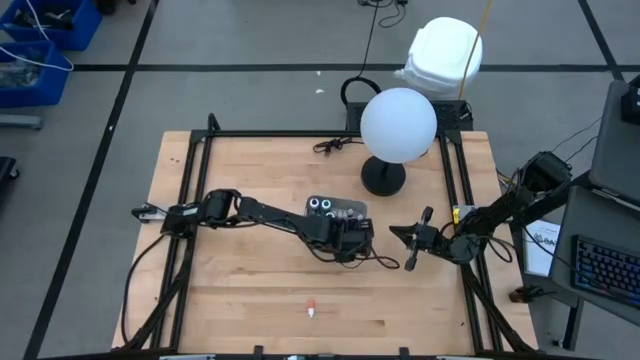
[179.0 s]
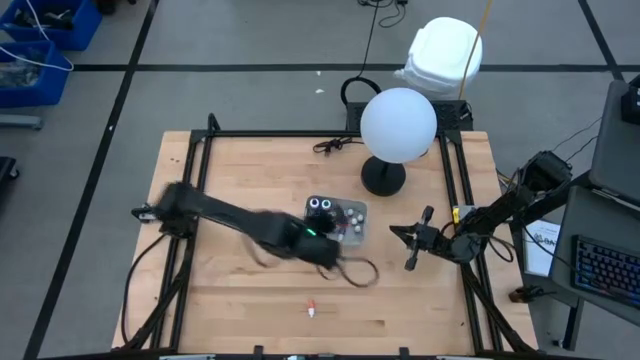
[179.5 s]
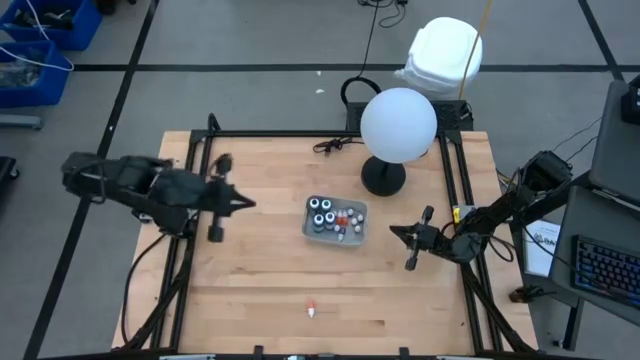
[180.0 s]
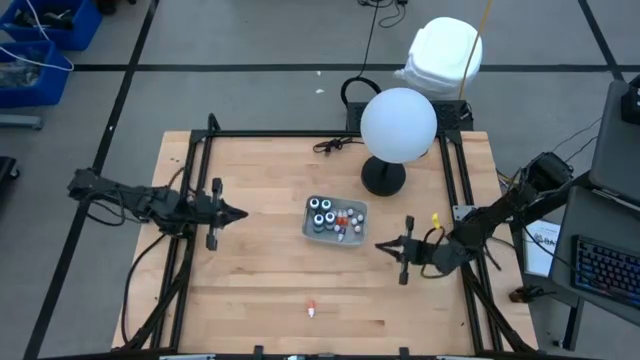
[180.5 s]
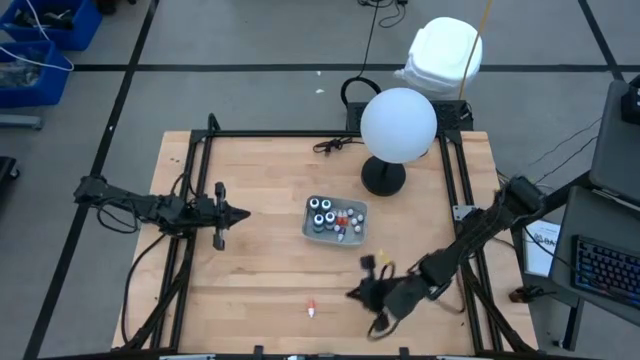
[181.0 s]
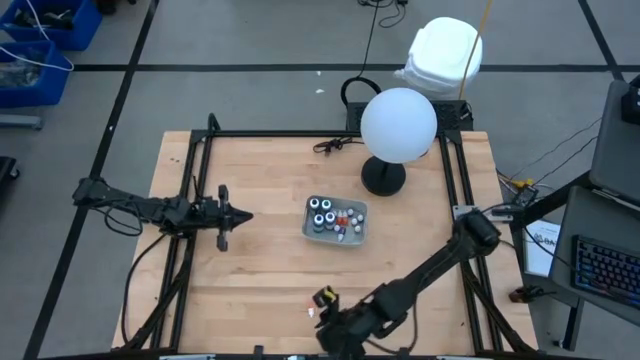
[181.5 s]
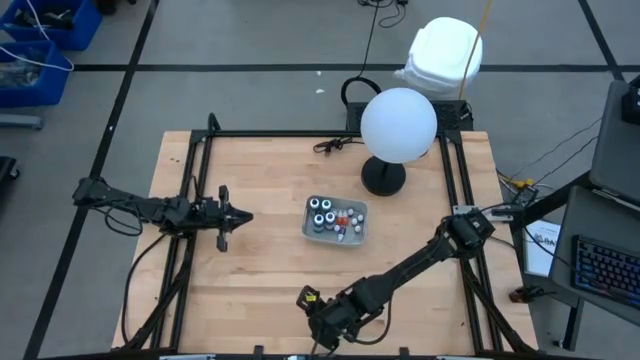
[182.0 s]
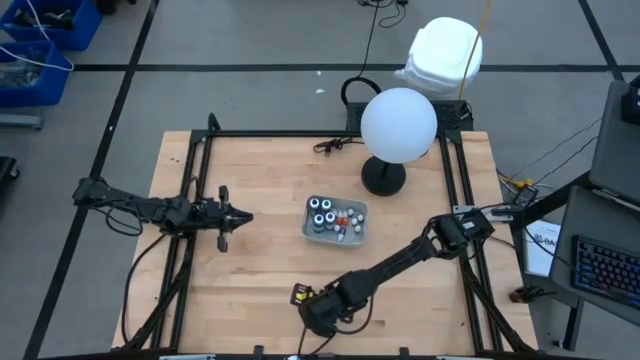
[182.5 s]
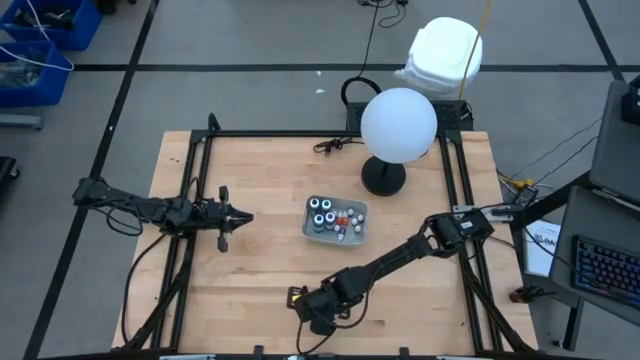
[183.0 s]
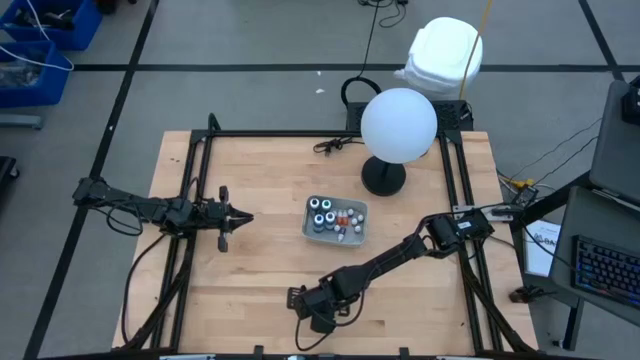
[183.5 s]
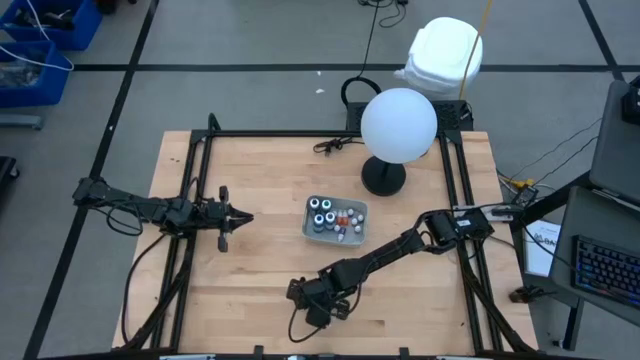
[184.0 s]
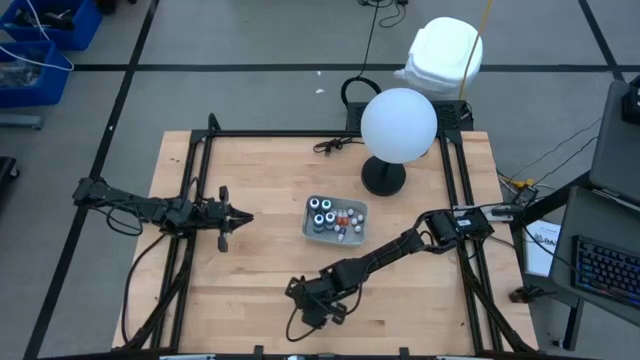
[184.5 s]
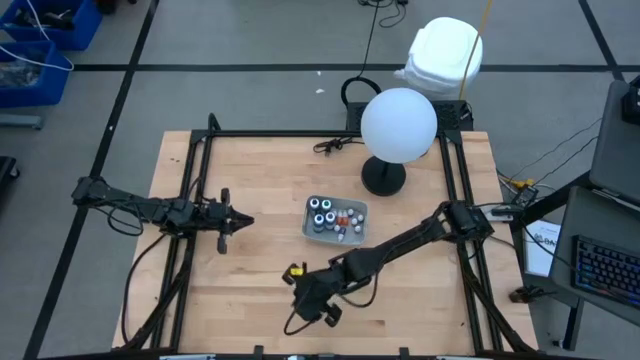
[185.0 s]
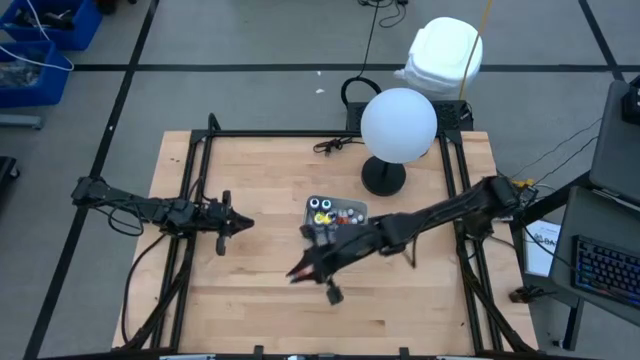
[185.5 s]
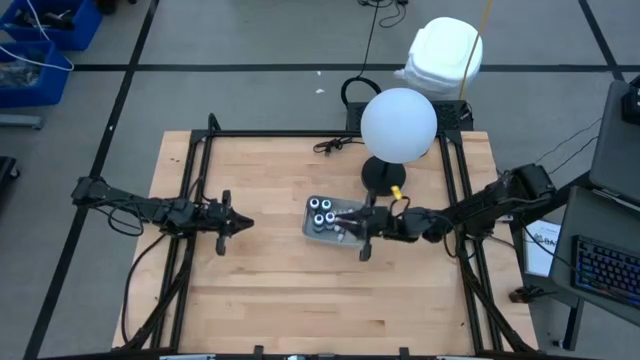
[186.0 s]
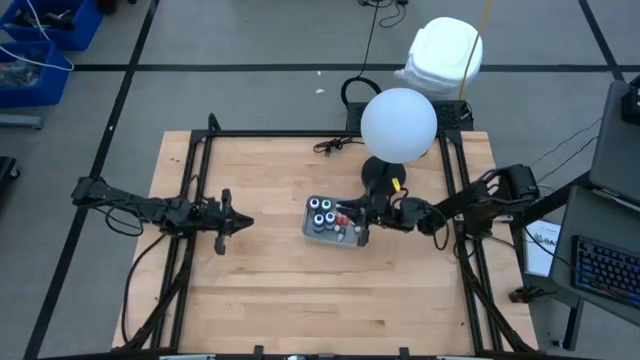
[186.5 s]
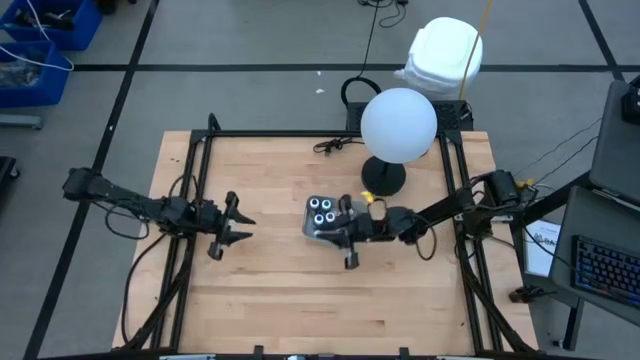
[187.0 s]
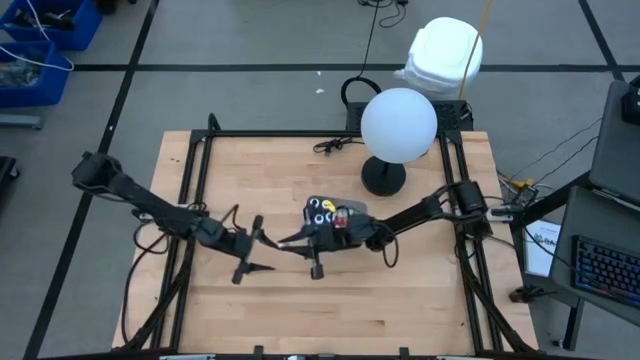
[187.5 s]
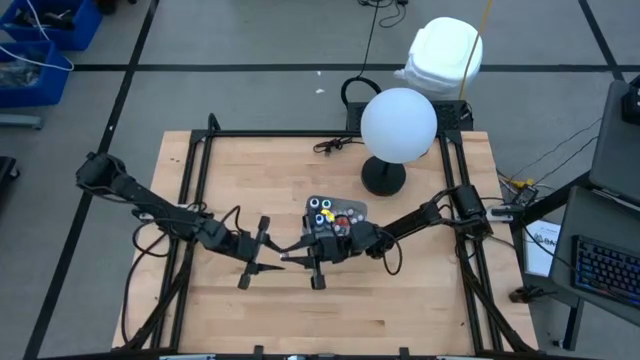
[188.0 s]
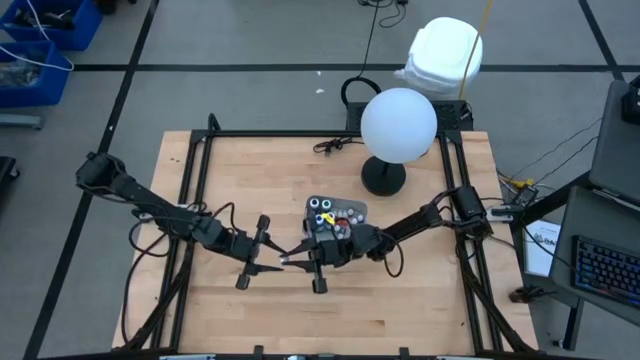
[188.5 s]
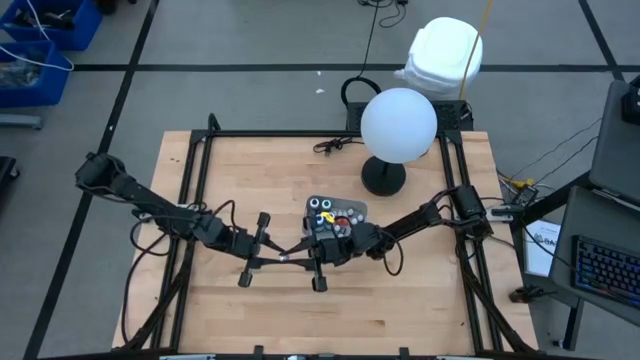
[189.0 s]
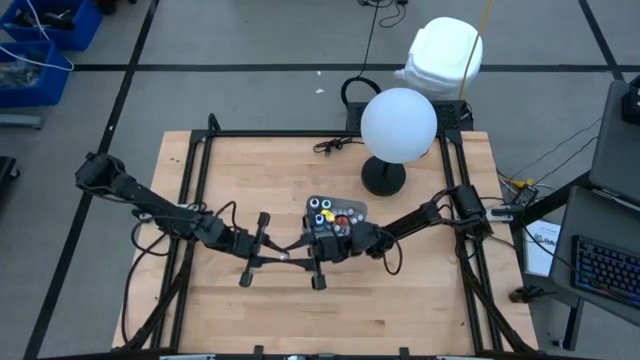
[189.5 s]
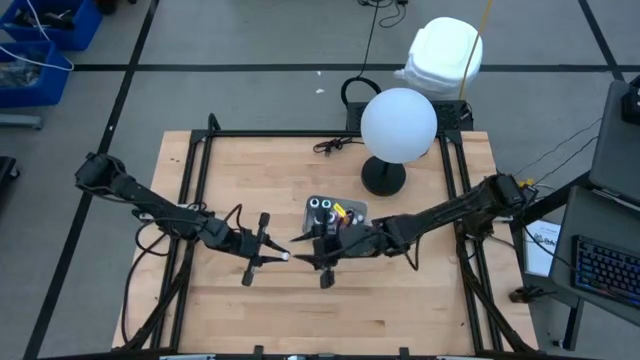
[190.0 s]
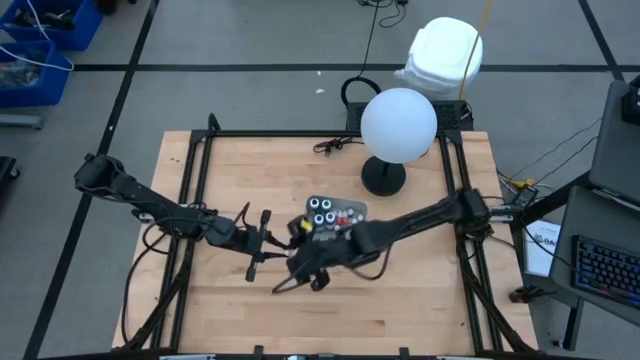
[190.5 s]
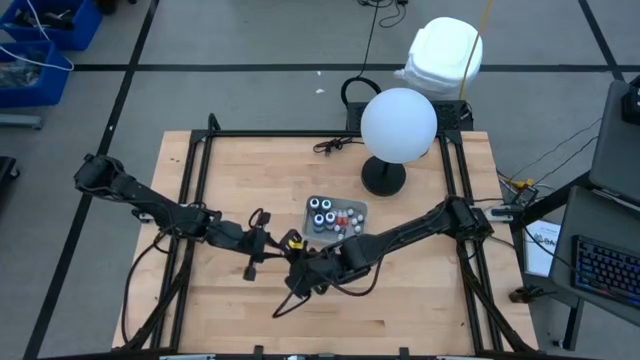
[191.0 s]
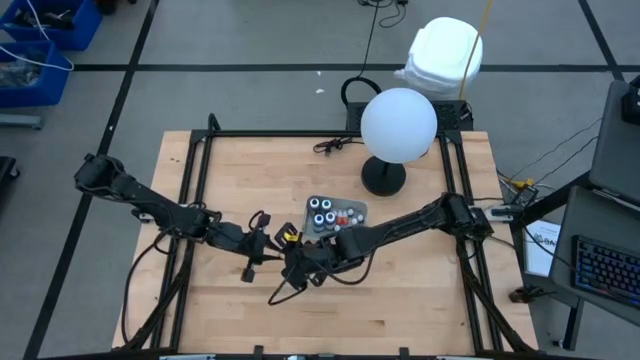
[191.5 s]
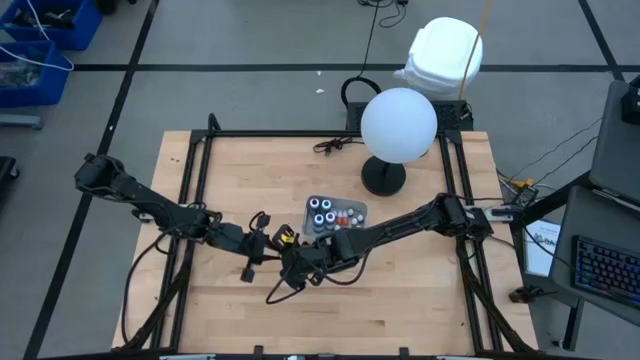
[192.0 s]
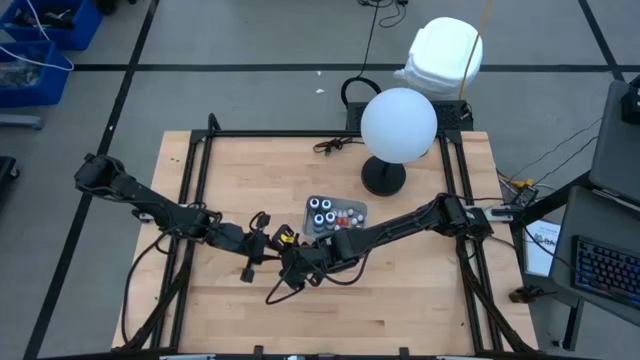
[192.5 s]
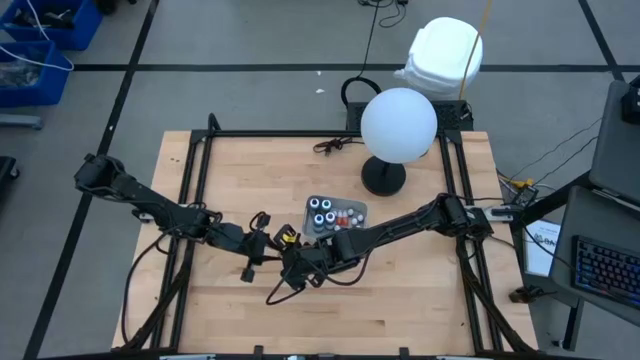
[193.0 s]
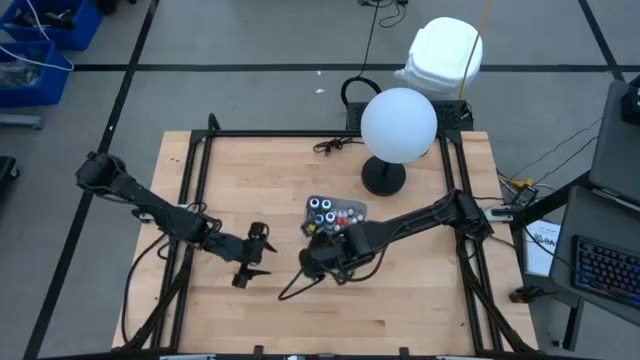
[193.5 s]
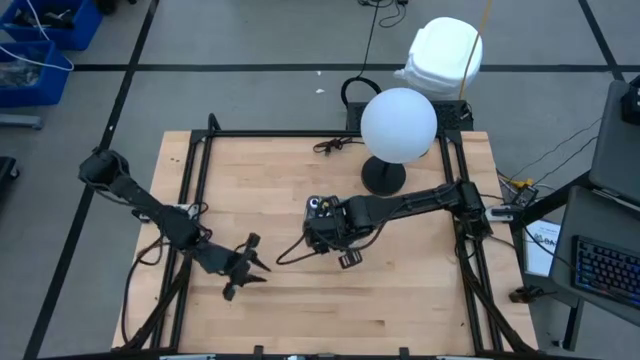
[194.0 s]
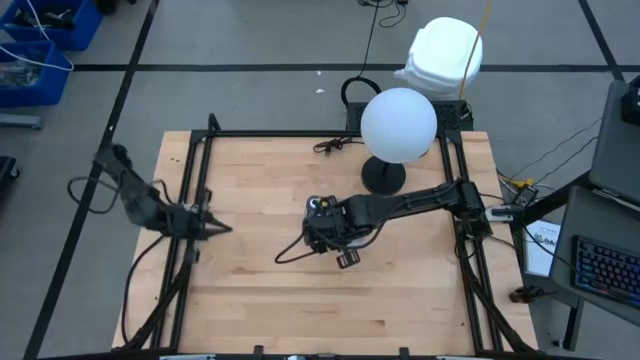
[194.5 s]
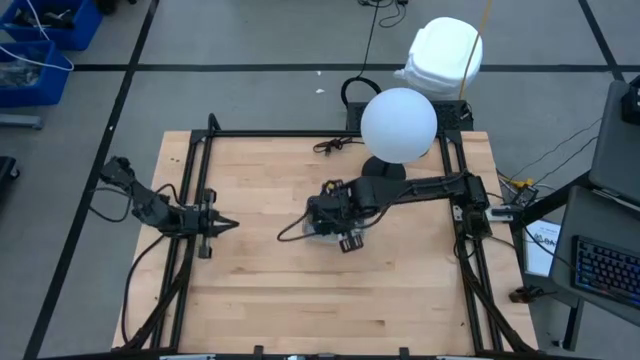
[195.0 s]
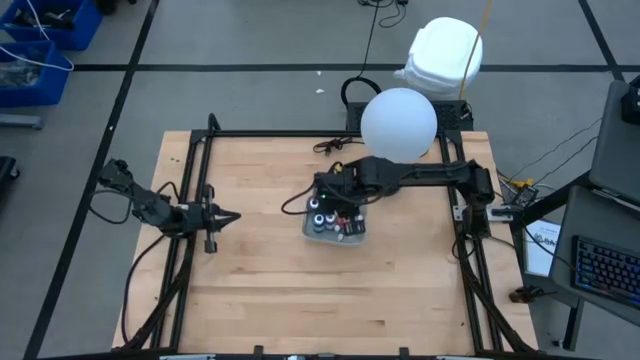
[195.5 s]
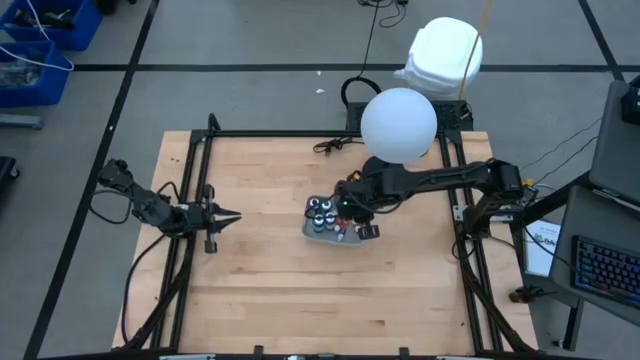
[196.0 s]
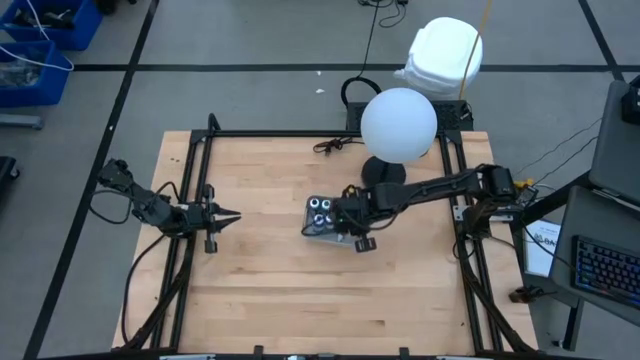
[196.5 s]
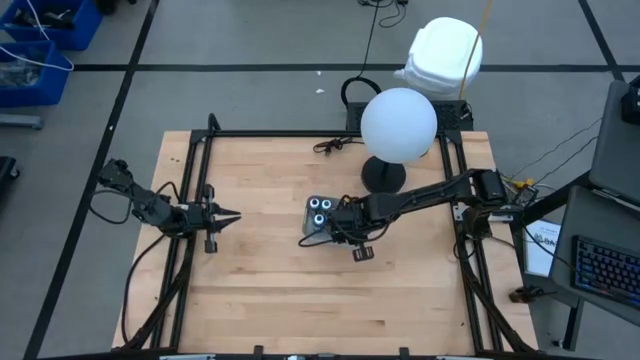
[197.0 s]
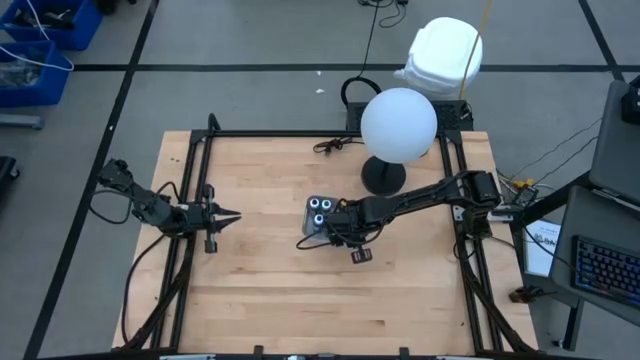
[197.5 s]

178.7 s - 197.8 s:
Task: Pick & Place food coloring
Put the small orange food coloring bottle into the gray bin

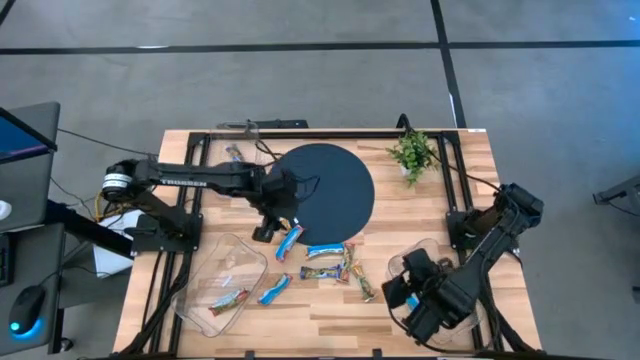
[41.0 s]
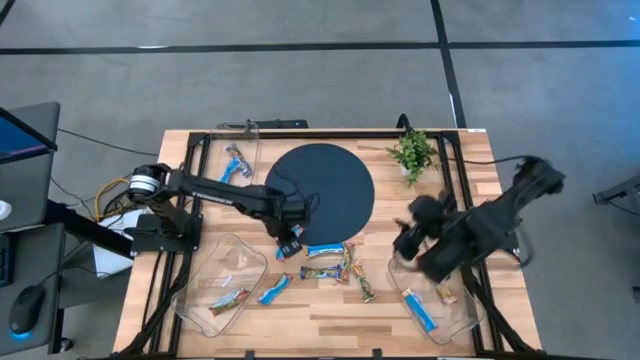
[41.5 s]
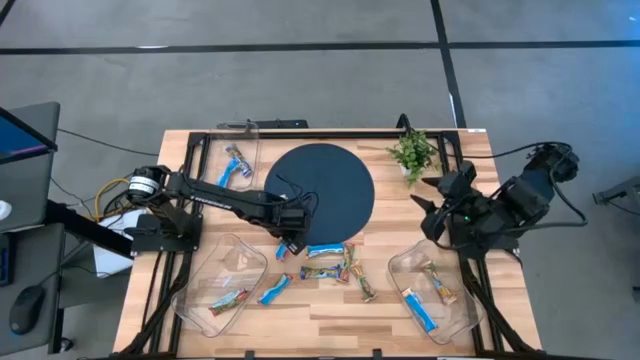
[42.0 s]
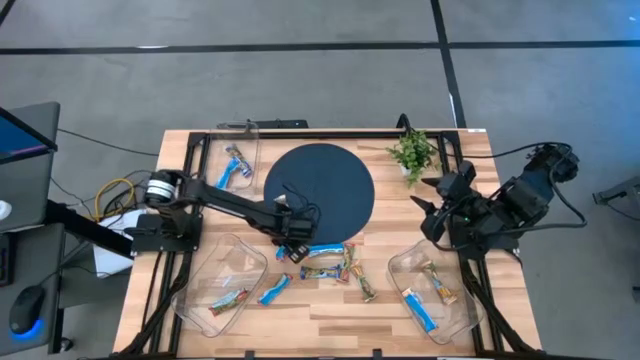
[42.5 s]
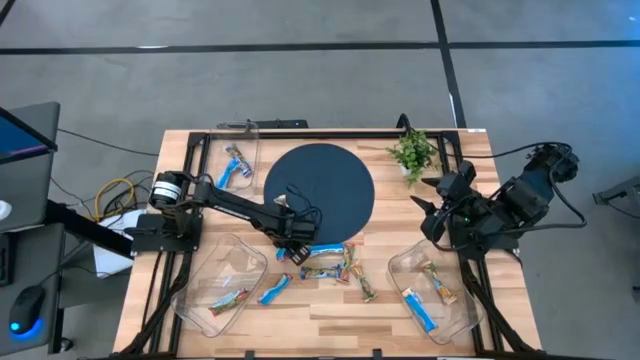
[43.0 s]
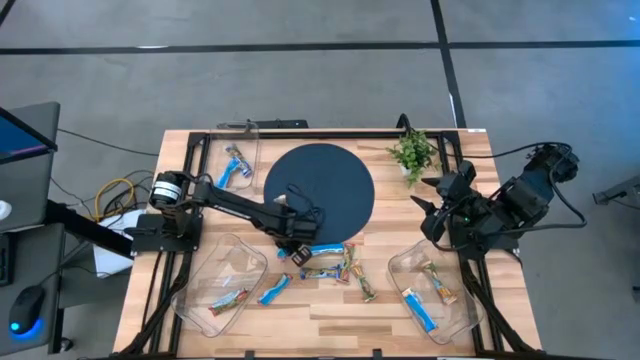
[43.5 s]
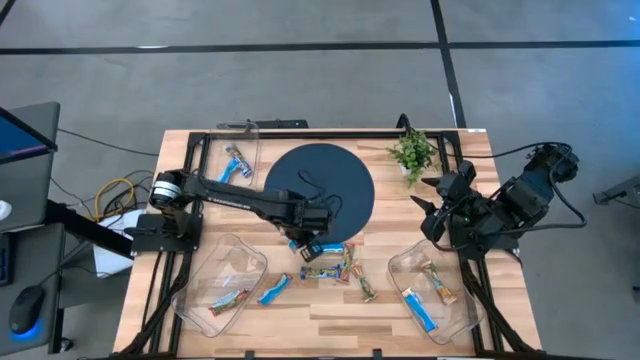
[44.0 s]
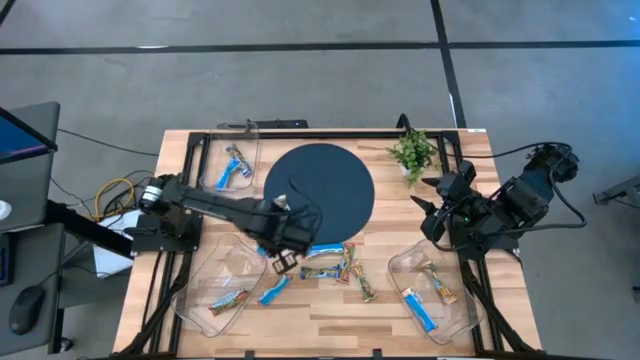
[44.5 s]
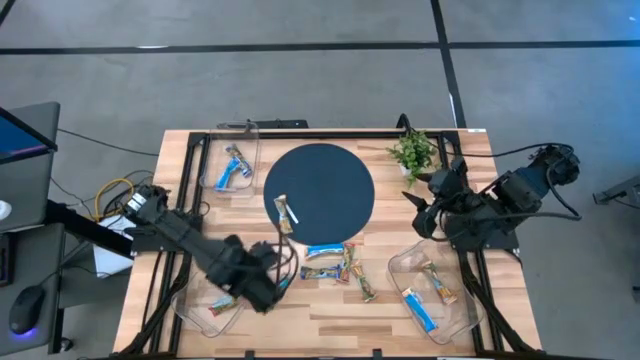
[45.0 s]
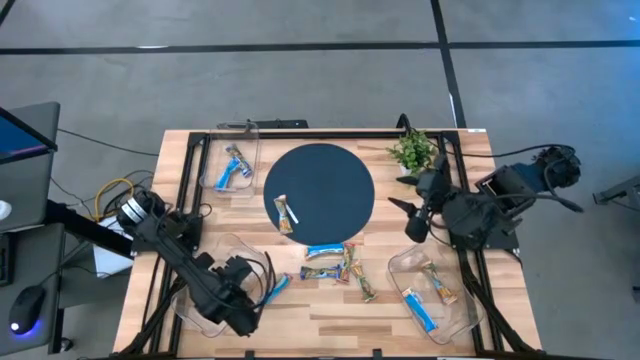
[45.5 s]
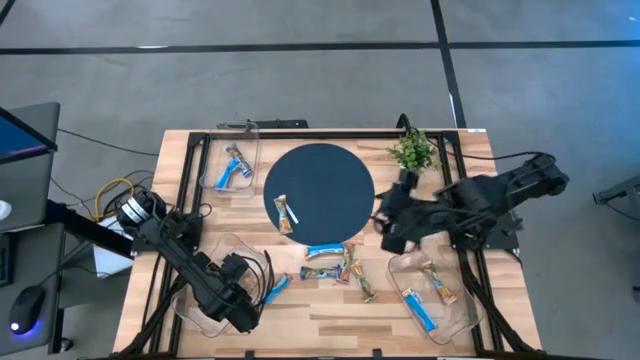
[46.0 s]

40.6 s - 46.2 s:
Task: Pick and place Granola Bars by type
Put the red granola bar into the bottom left transparent bin
